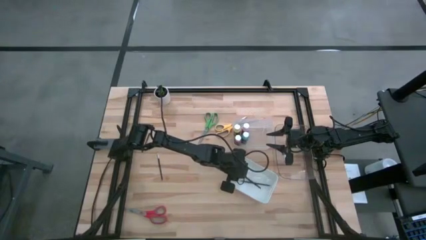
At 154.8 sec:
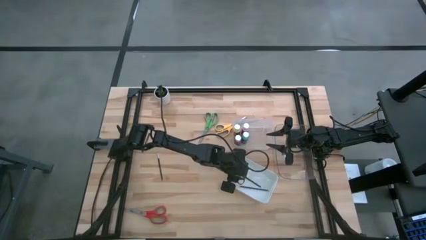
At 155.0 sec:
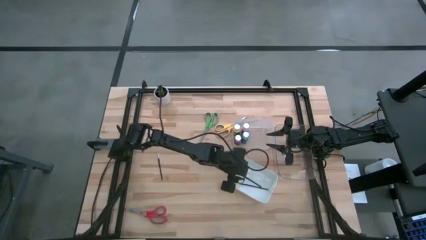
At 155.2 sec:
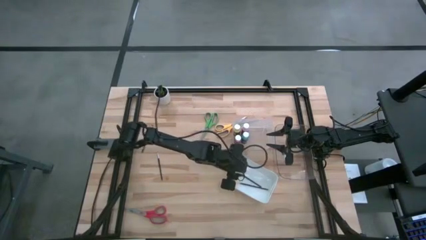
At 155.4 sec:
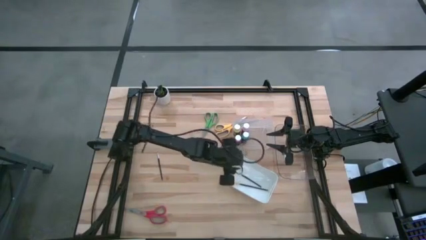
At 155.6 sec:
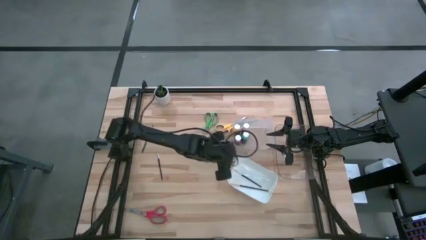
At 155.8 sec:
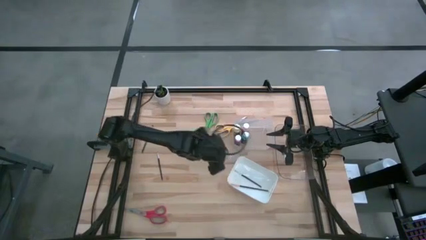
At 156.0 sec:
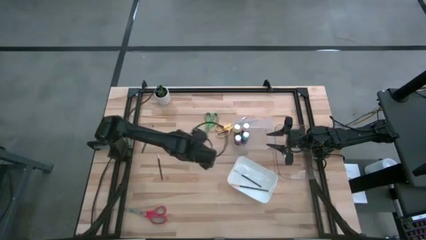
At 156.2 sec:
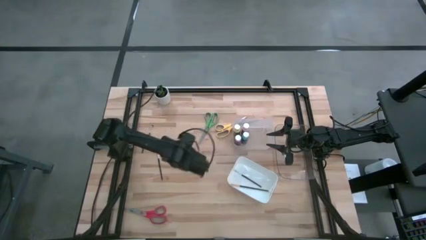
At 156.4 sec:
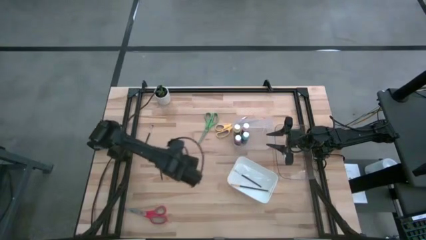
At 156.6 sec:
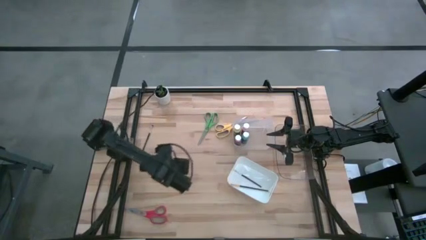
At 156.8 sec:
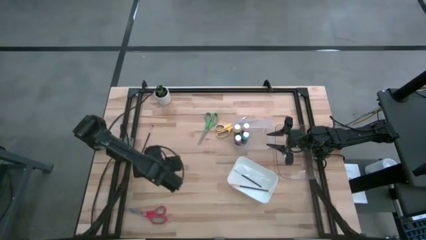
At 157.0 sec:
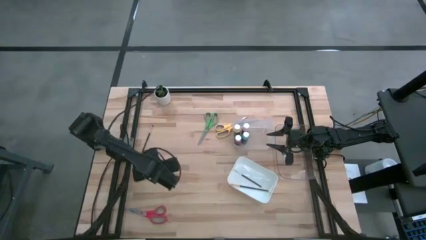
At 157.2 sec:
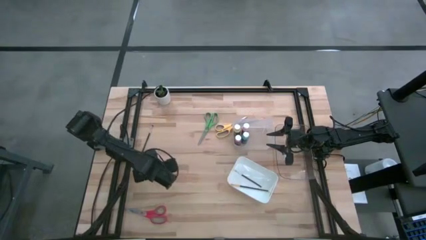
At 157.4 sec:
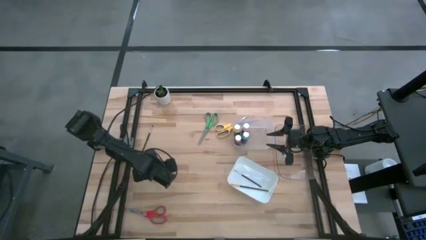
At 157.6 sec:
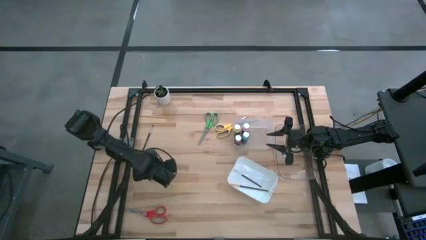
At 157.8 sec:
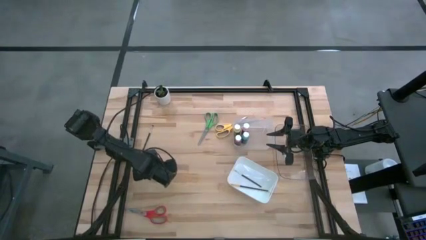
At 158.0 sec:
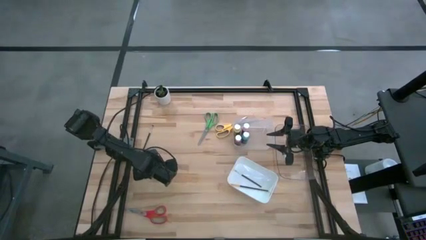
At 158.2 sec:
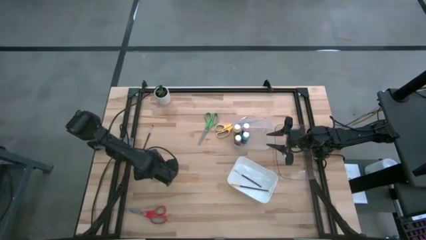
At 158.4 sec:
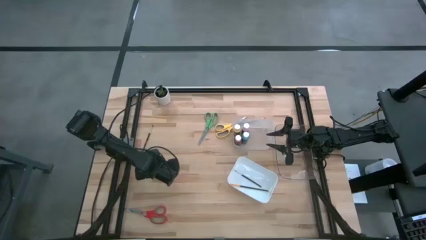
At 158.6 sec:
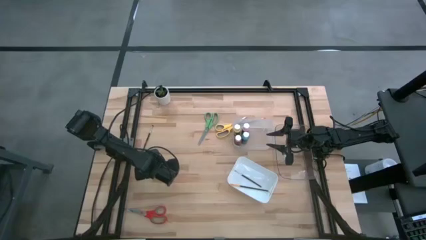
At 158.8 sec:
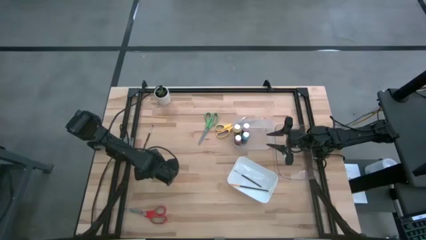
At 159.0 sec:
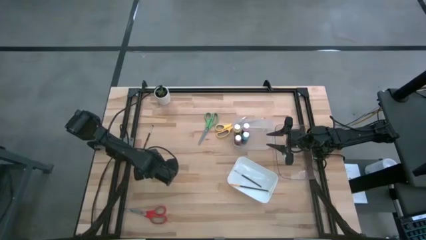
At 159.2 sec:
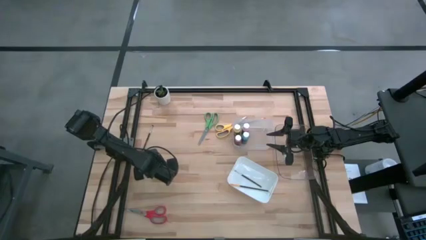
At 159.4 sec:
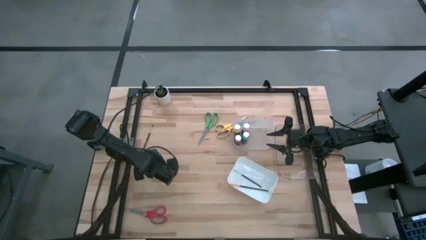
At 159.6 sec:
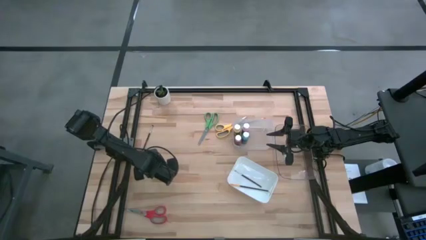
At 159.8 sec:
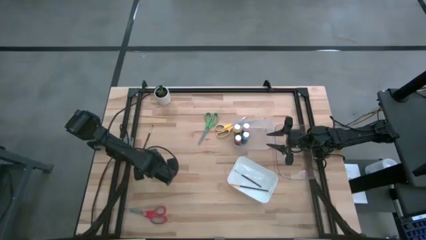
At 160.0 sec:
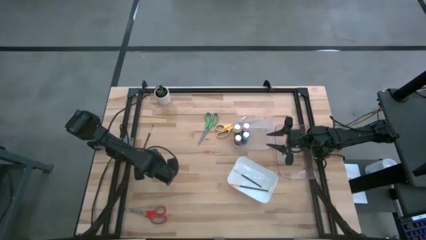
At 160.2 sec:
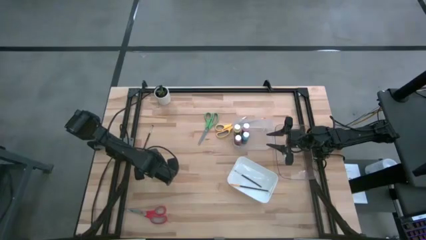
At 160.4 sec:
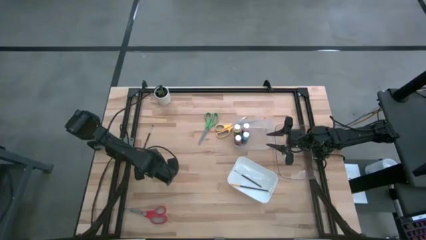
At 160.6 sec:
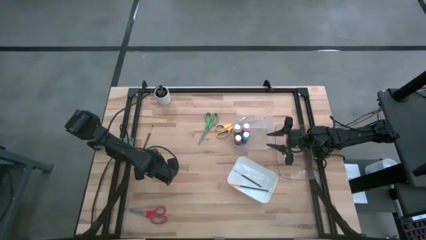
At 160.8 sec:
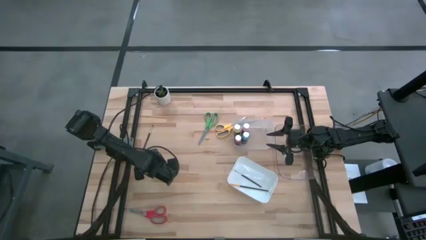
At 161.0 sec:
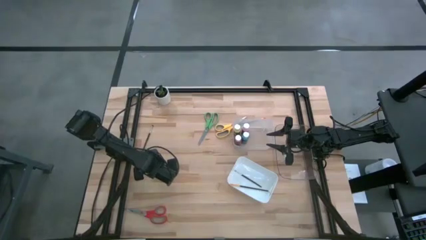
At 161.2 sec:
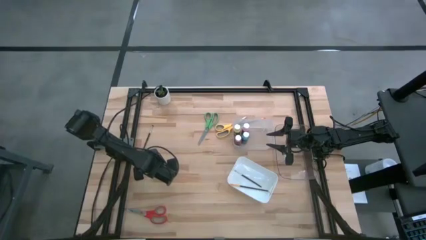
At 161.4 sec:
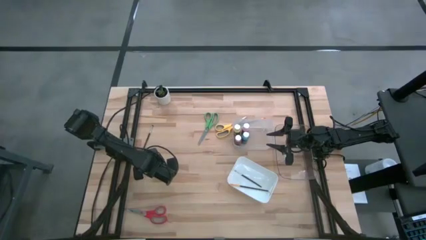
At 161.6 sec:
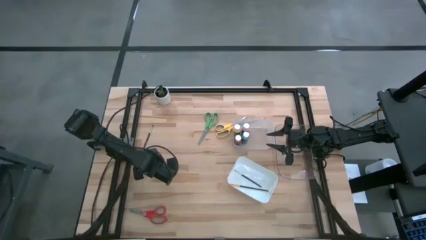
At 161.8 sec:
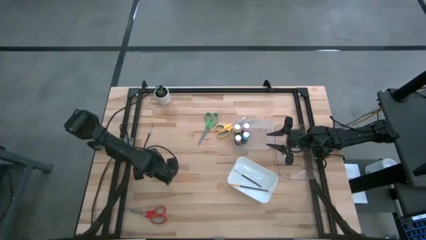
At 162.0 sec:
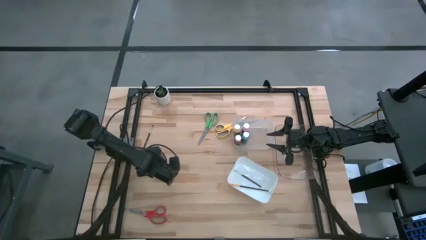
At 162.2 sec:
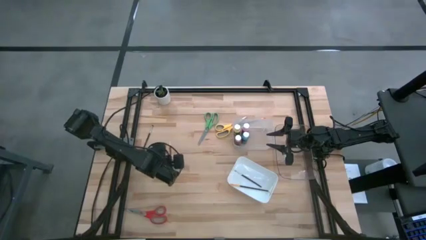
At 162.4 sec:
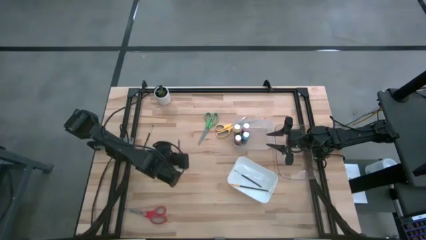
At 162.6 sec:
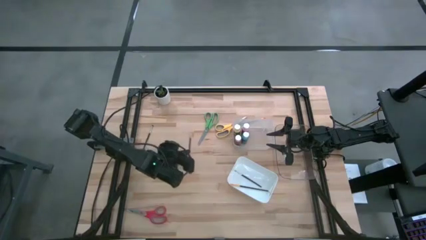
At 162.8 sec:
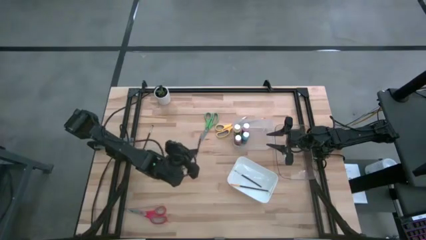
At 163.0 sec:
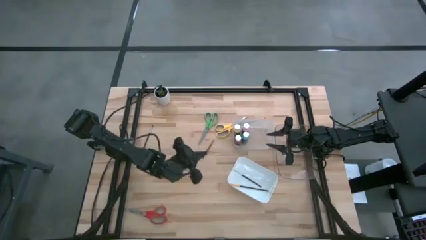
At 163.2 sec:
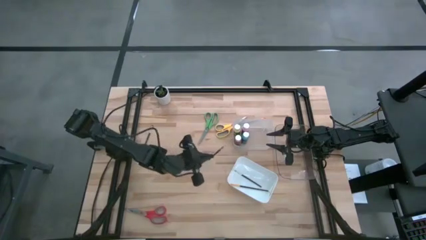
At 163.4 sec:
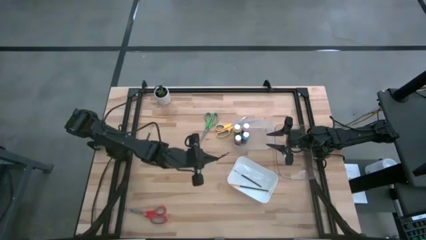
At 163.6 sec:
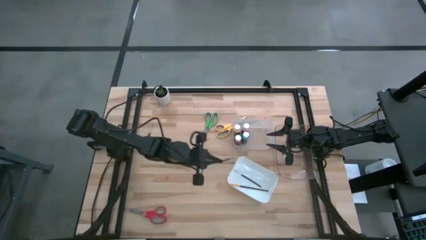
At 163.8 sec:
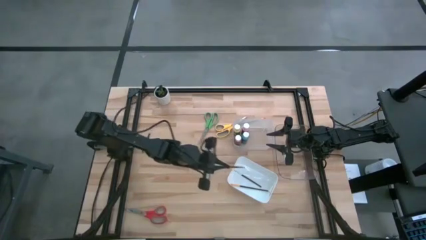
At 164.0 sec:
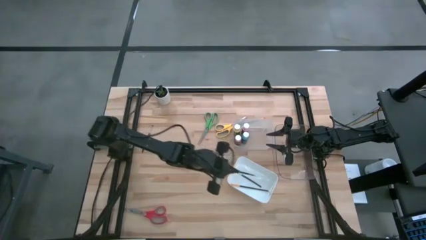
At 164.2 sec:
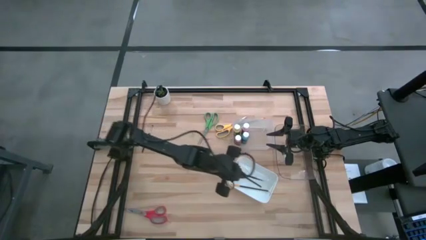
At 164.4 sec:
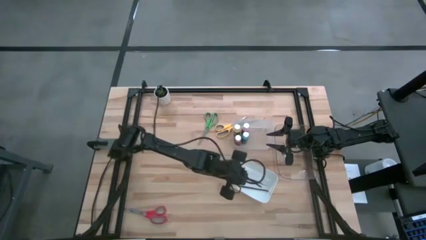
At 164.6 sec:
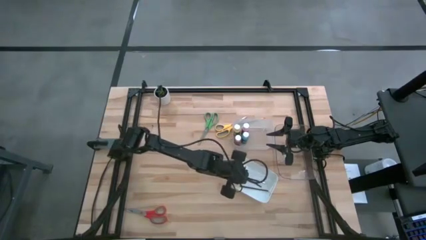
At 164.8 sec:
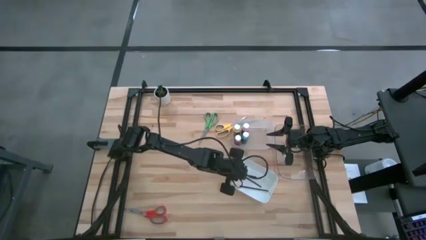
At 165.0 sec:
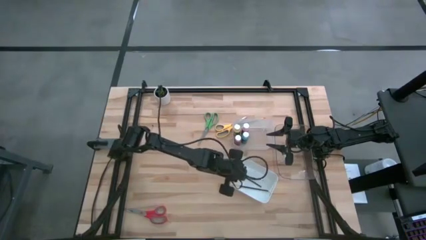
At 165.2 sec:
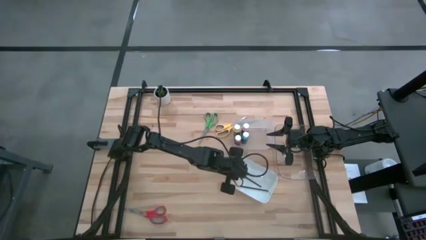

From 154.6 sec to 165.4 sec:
Task: Pick & Place Paint Supplies
Put the black paintbrush into the white bin

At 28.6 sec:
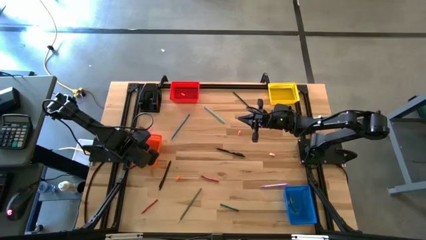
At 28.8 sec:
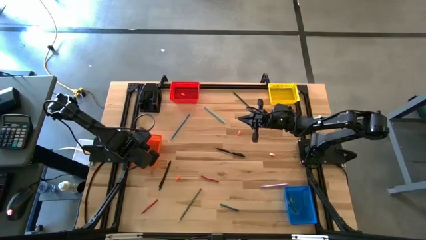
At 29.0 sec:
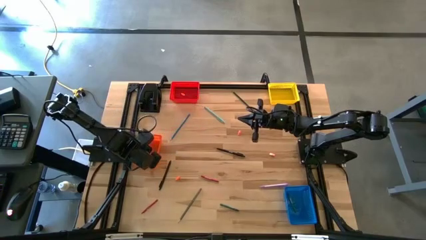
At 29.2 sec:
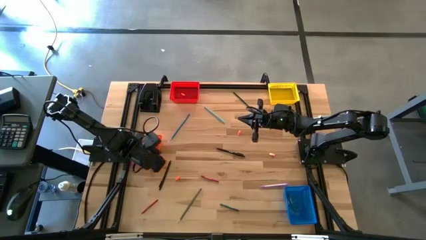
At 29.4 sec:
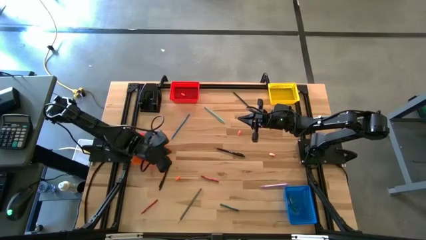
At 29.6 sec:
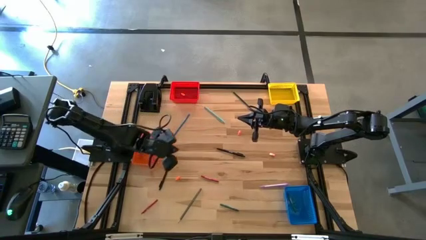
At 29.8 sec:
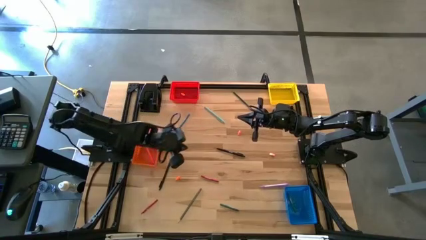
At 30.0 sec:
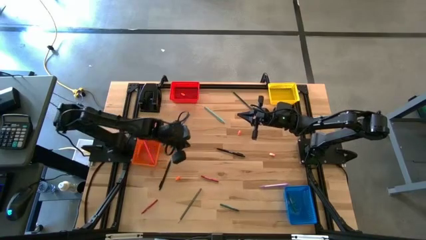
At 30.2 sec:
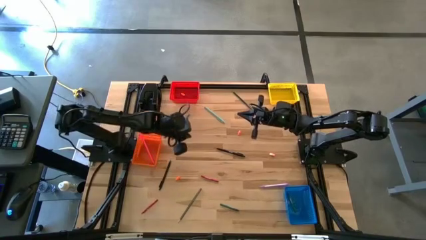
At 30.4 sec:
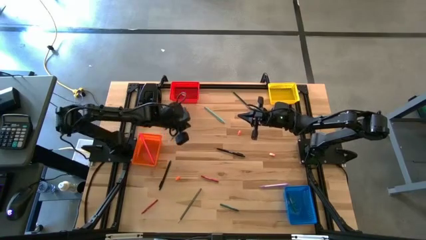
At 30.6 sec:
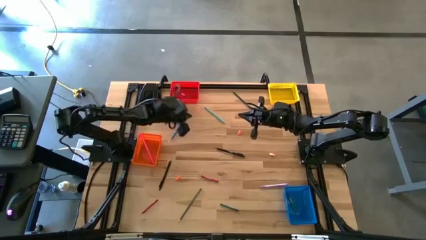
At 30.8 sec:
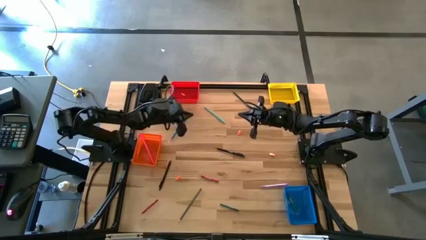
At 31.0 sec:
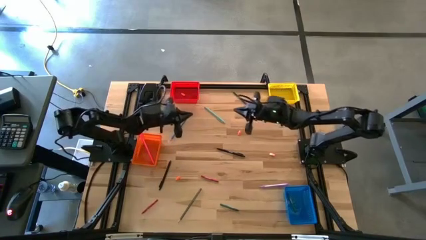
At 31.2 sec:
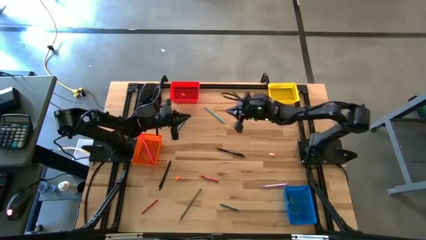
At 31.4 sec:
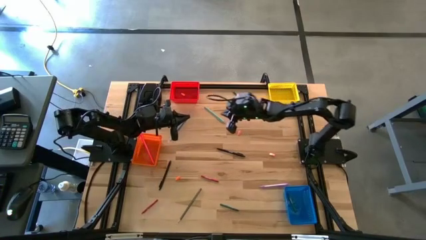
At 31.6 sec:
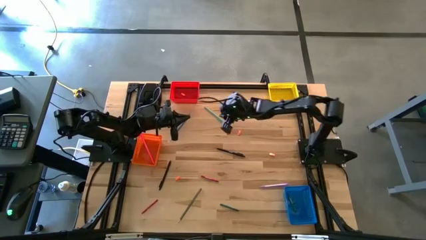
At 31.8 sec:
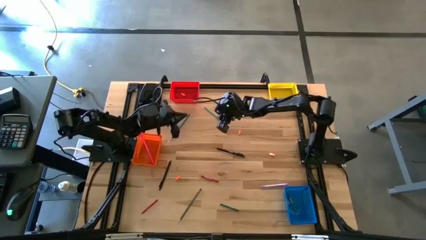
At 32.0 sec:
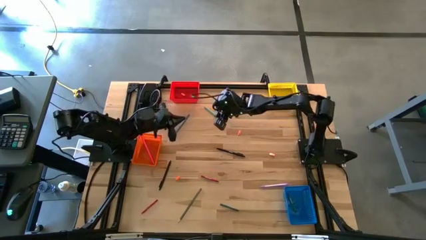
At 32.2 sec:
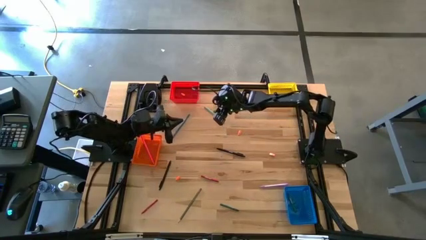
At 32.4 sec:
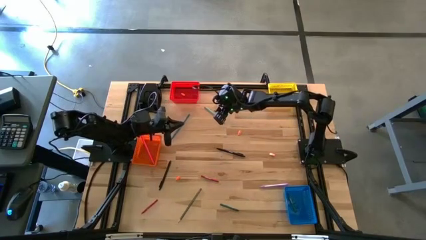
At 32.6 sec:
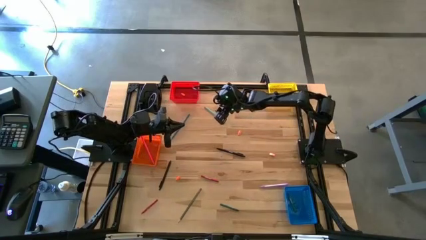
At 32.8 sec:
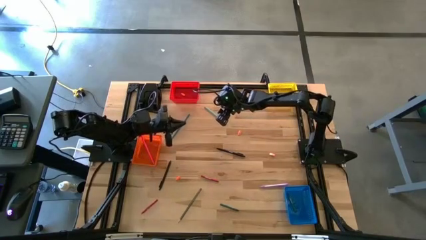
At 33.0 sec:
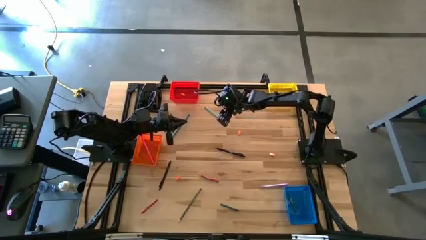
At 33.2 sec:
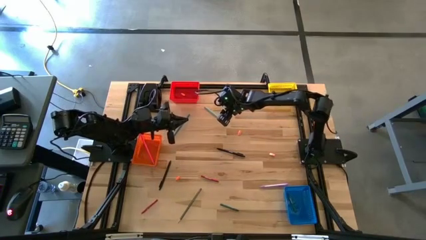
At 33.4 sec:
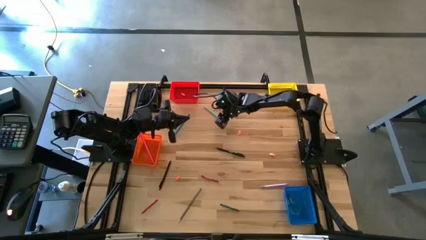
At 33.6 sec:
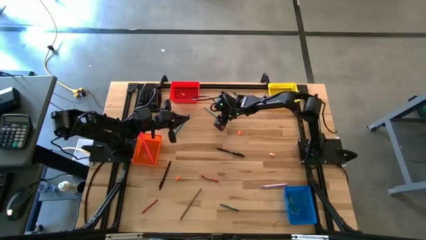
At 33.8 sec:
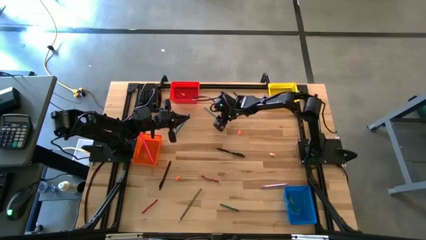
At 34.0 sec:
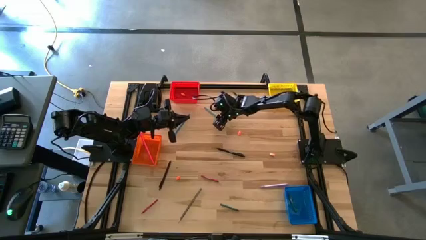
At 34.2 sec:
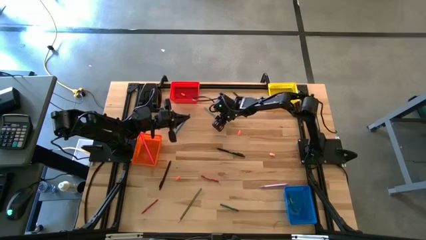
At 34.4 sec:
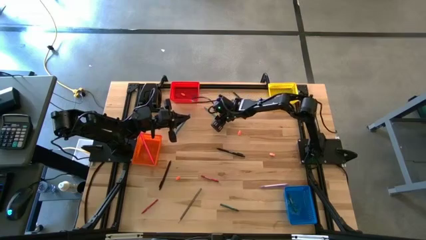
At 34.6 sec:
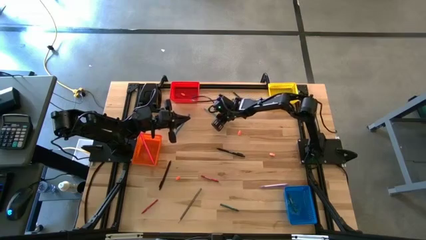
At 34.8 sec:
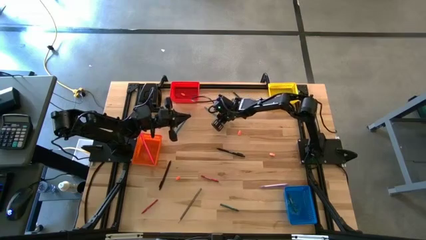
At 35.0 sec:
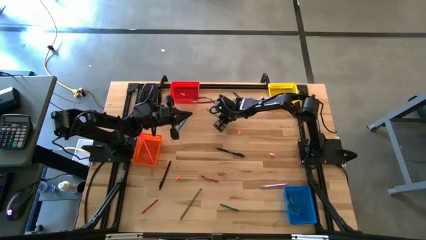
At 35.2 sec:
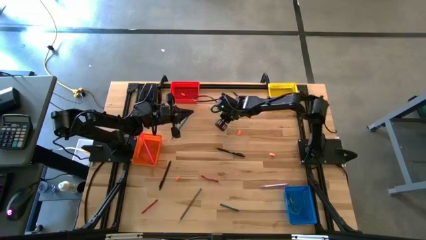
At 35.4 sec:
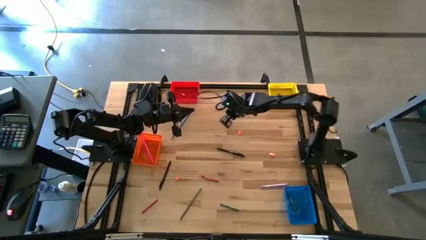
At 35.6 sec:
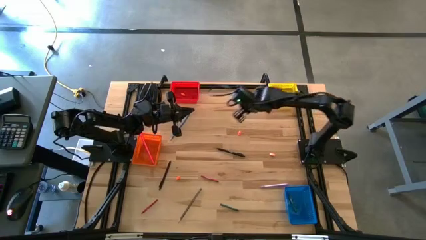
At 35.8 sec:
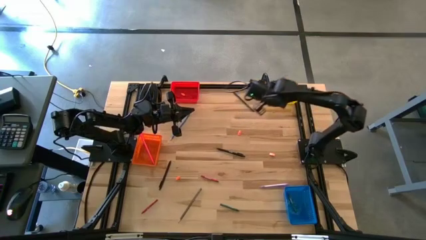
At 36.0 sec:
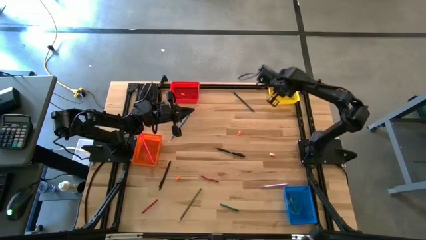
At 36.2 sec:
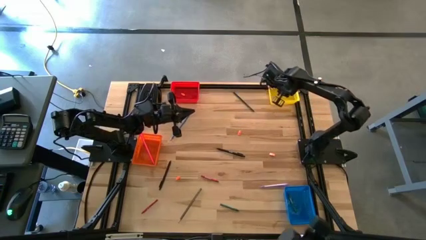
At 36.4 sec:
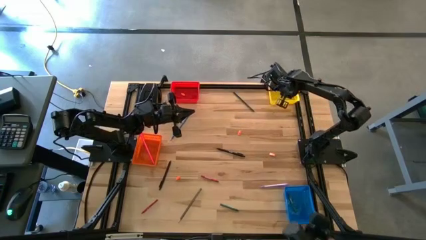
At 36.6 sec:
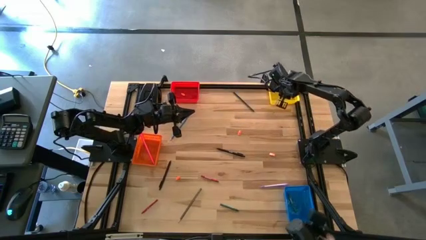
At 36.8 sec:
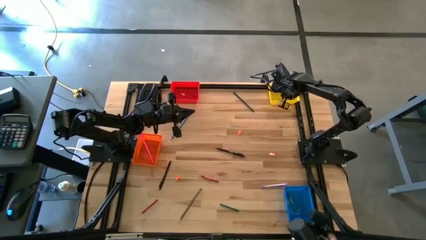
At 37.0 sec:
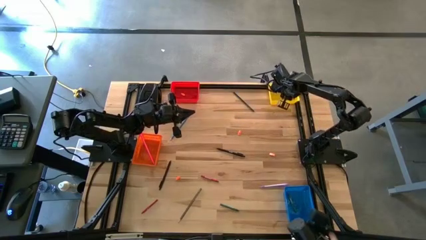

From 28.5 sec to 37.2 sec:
Task: Sort crayons/erasers/pens/pencils in bins
Put the blue pen into the yellow basket
